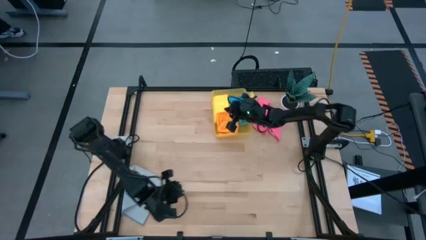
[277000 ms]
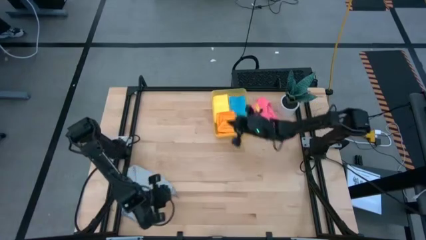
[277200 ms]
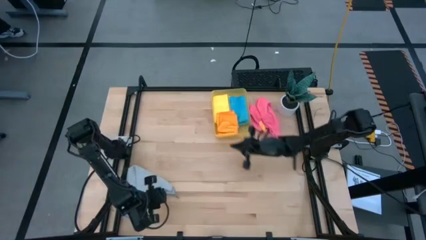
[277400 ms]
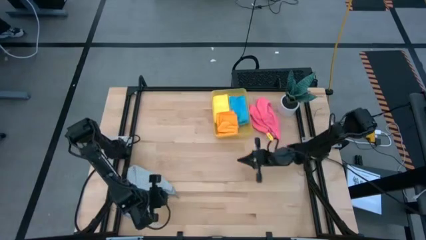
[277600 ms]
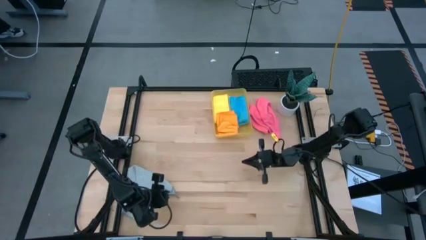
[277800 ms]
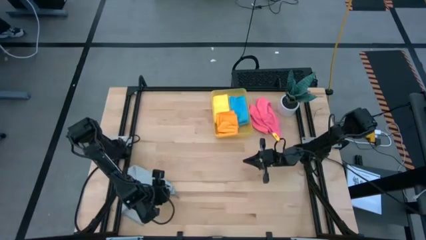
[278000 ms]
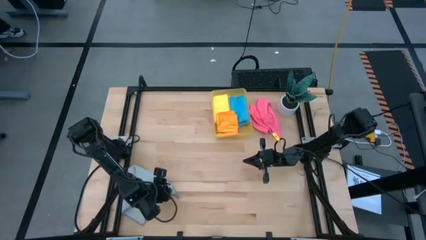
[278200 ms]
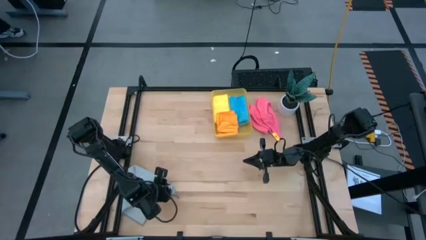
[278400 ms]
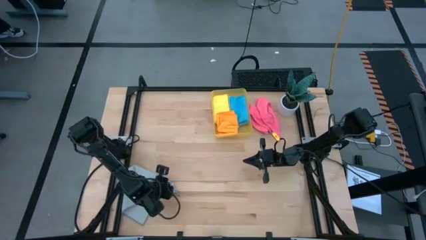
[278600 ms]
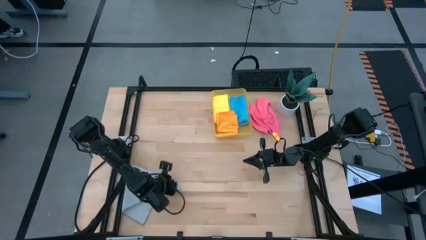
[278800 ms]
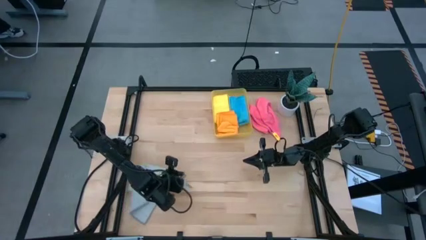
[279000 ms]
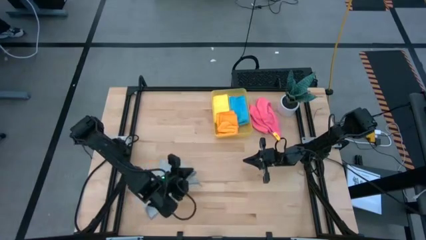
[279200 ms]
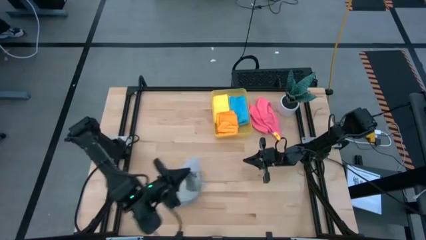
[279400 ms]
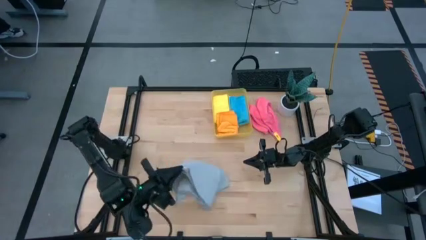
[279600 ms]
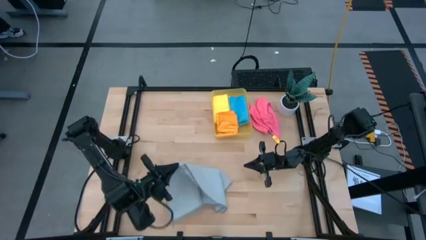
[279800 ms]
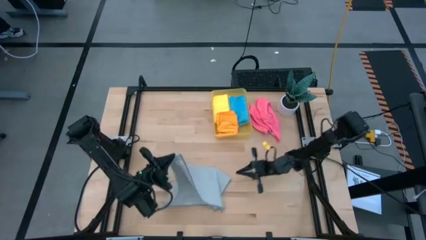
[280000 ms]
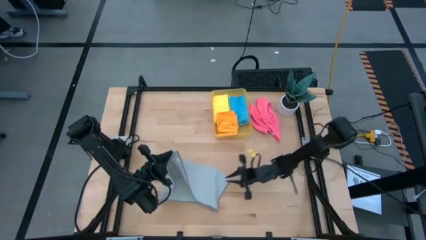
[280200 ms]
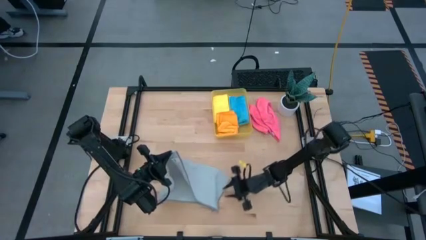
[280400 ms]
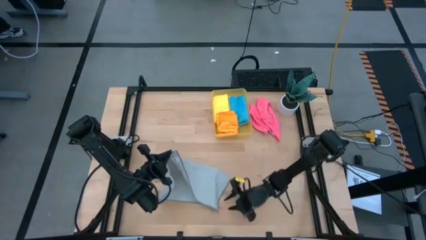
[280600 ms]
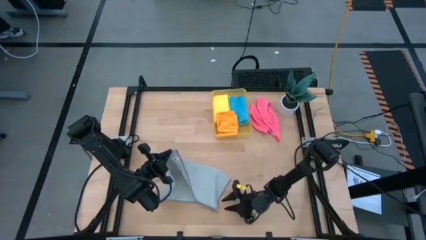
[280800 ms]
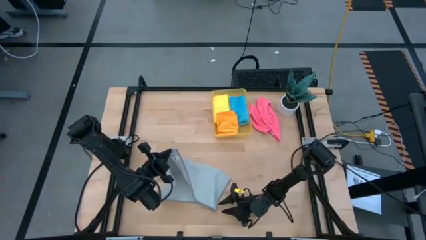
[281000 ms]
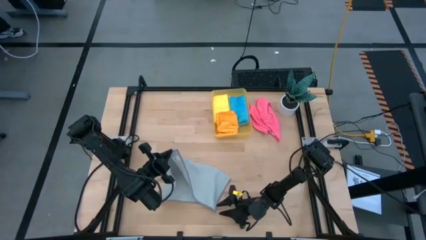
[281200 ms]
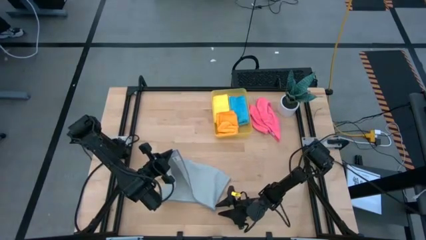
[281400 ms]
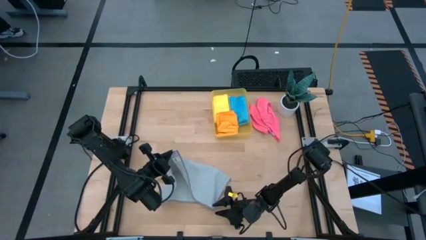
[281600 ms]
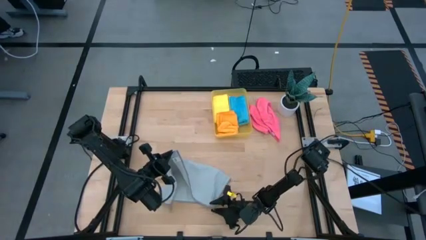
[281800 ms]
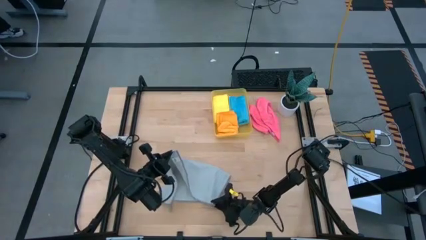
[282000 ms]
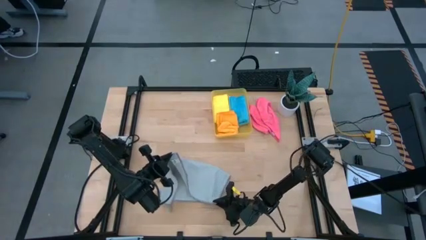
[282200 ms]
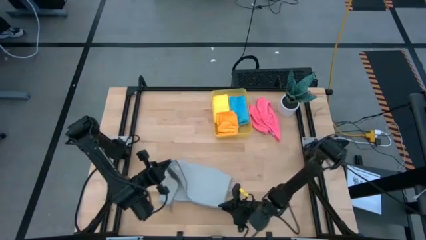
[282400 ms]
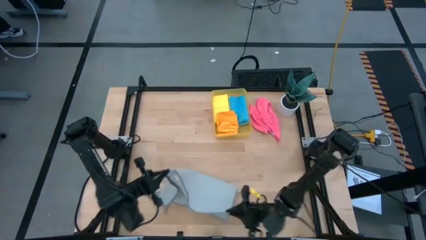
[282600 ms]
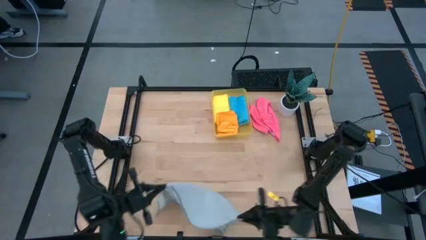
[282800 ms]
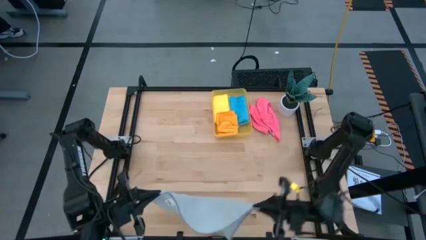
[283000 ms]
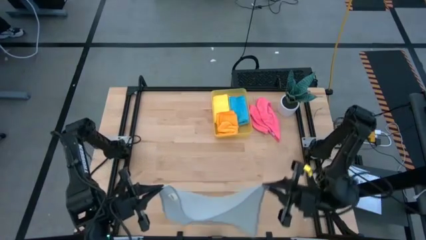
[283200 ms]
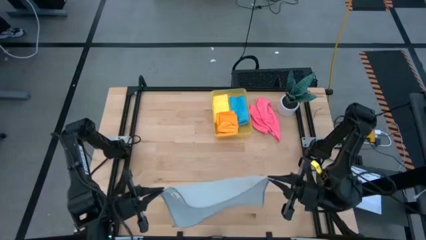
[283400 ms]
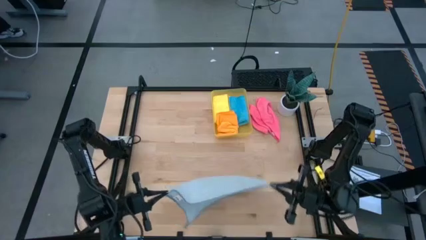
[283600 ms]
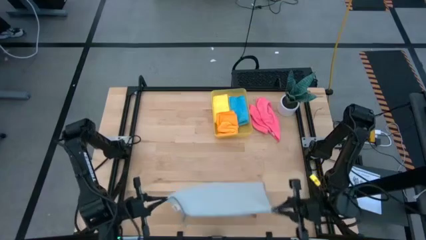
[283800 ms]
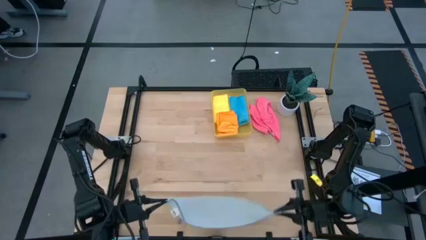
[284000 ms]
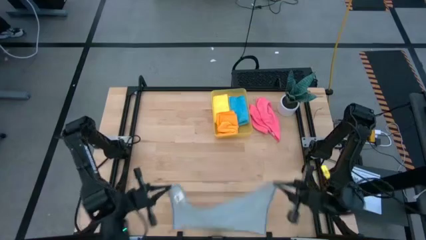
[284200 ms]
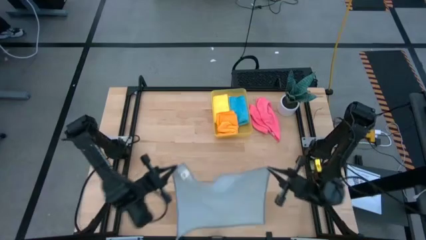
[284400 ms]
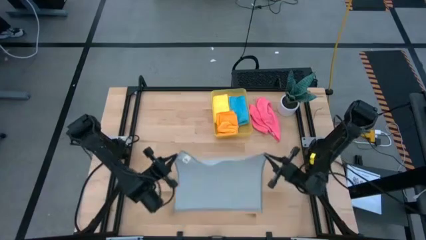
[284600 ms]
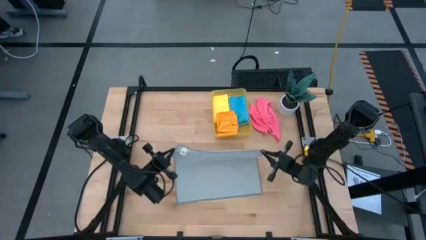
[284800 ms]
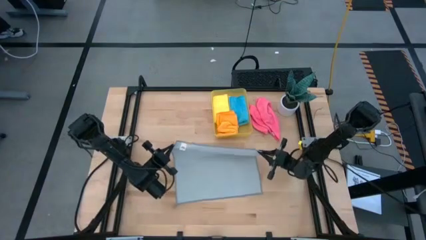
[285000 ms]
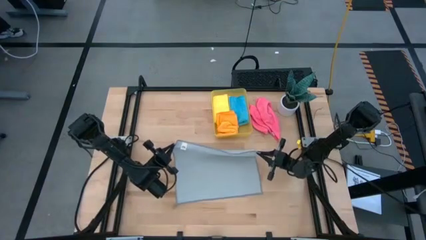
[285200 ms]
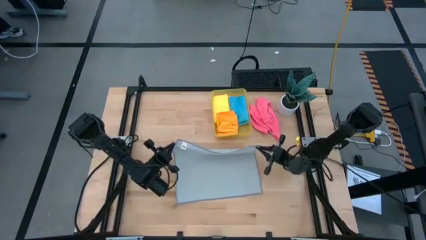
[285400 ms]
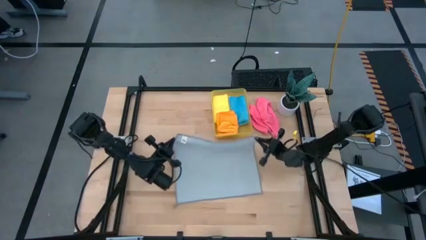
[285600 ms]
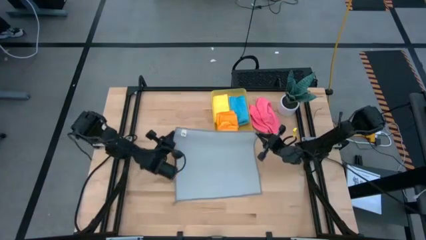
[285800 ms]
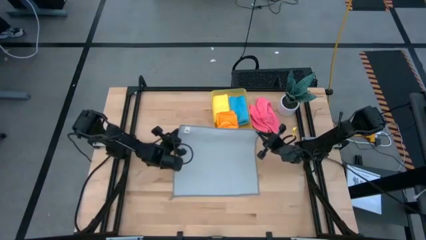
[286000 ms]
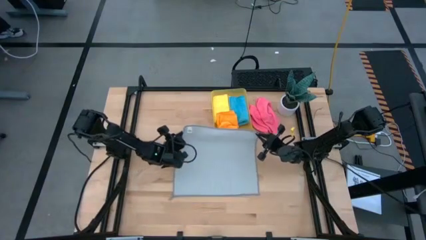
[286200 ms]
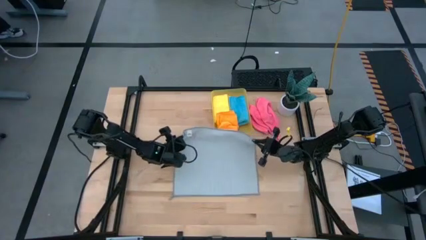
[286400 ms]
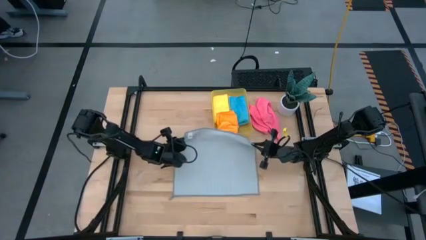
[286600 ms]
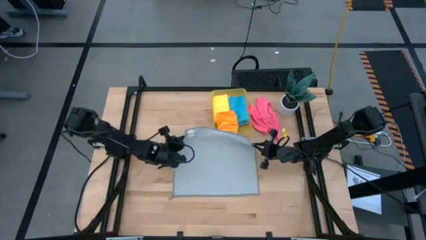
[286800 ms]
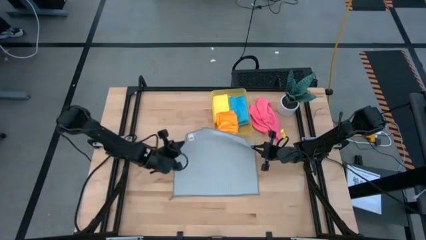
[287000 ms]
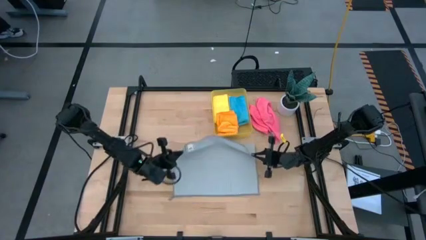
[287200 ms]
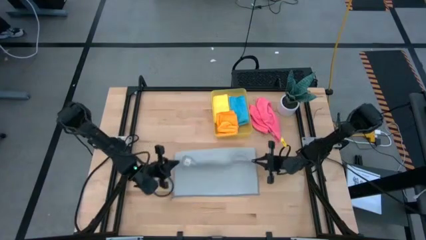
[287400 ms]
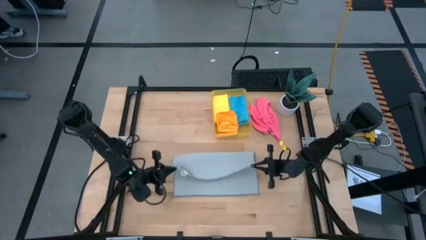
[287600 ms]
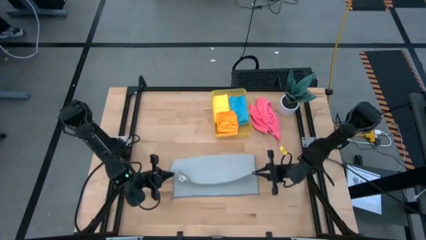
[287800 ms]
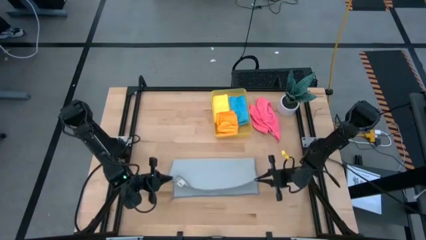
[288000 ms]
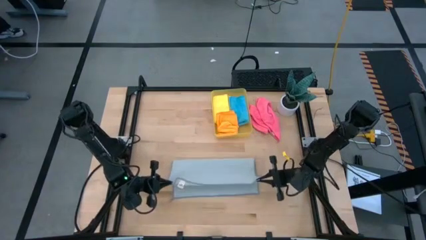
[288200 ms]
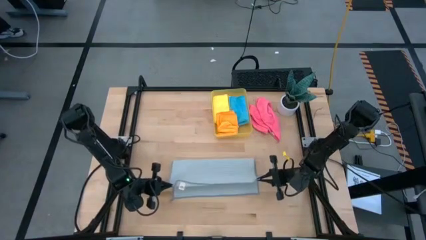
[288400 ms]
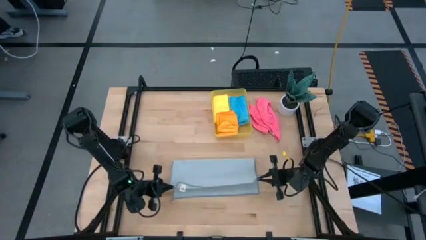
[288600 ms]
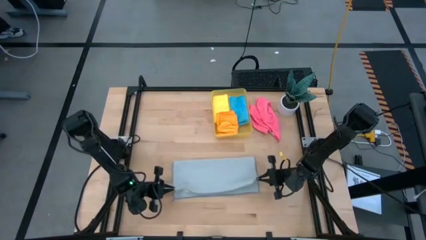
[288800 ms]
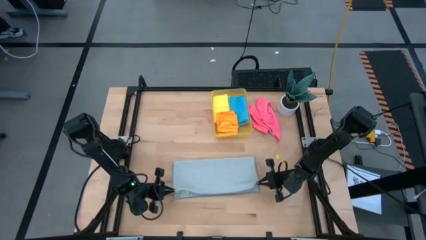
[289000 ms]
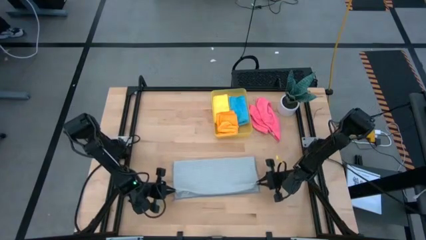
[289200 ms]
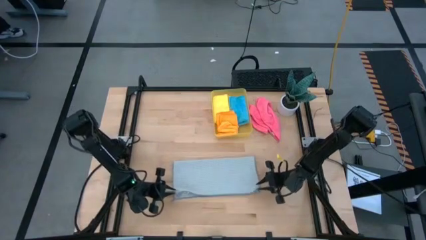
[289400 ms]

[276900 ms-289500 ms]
Task: Fold microfiber towels
Fold the gray microfiber towel

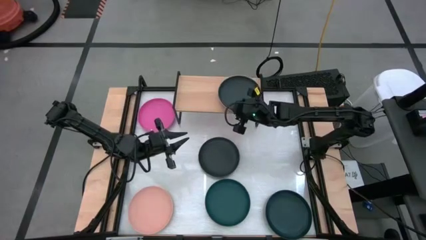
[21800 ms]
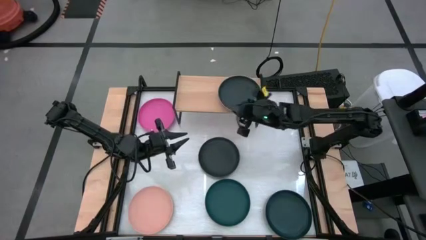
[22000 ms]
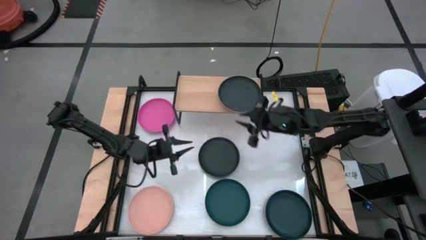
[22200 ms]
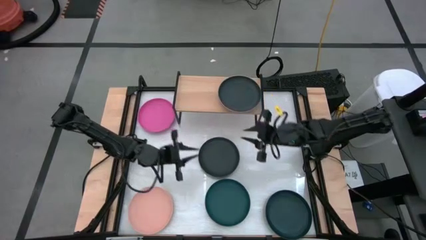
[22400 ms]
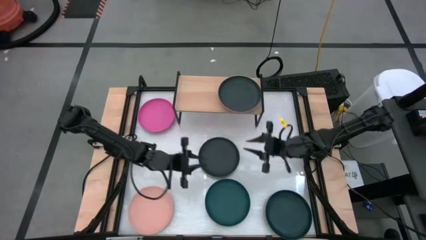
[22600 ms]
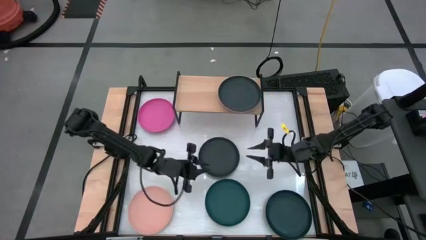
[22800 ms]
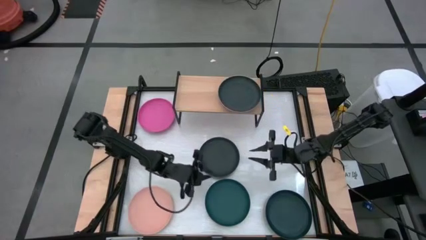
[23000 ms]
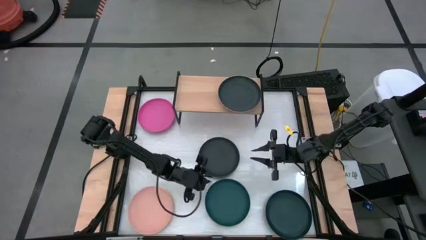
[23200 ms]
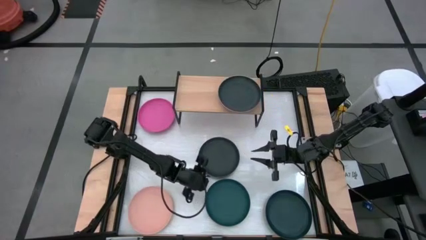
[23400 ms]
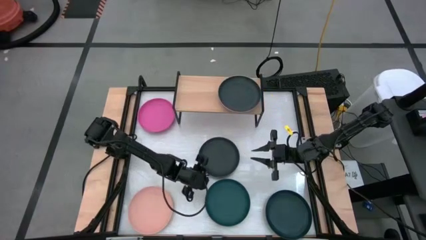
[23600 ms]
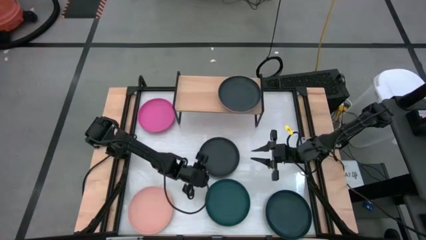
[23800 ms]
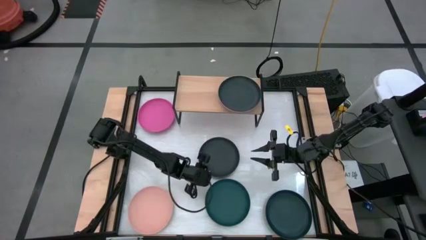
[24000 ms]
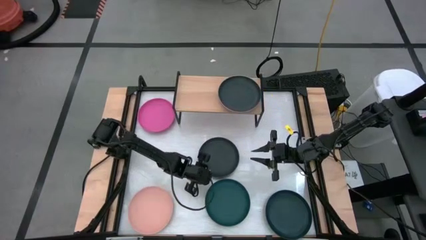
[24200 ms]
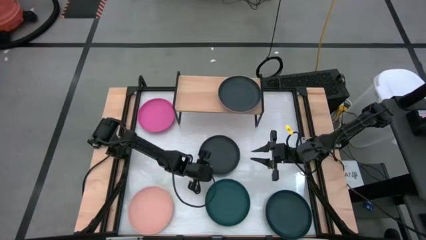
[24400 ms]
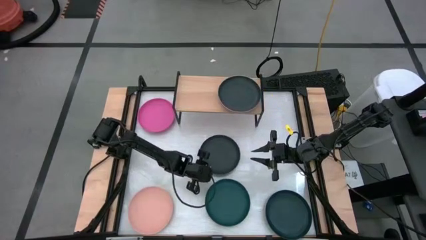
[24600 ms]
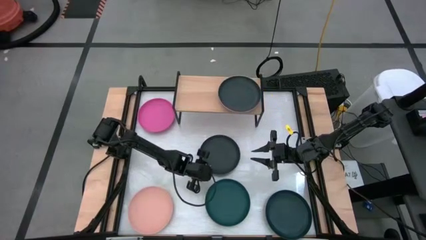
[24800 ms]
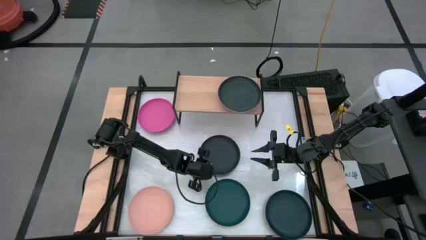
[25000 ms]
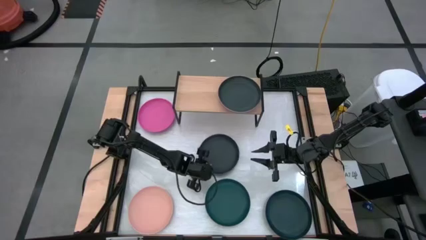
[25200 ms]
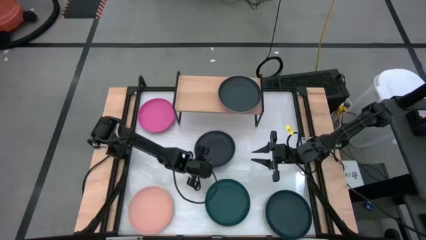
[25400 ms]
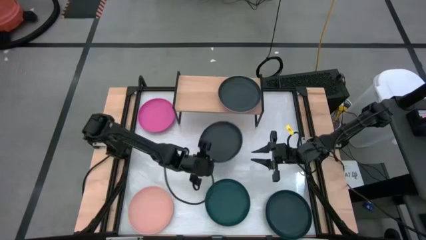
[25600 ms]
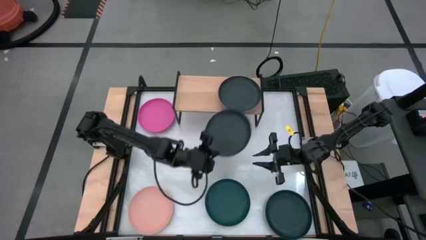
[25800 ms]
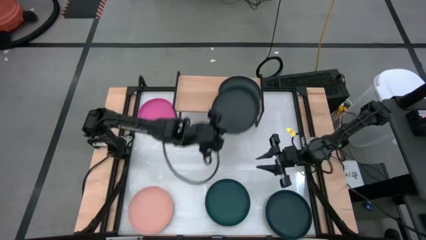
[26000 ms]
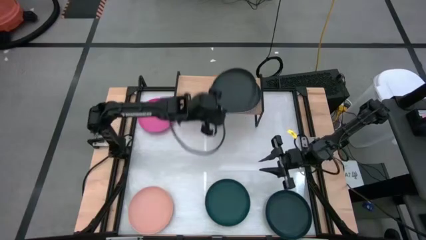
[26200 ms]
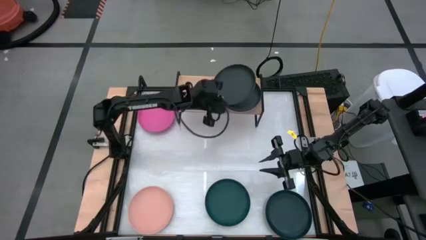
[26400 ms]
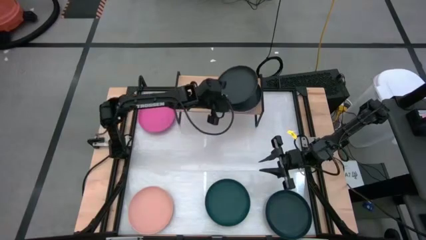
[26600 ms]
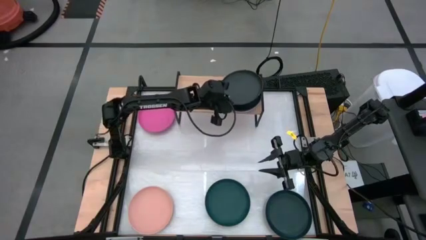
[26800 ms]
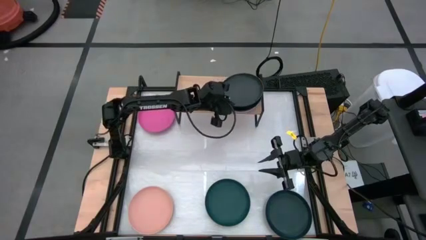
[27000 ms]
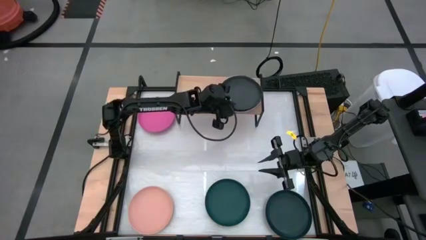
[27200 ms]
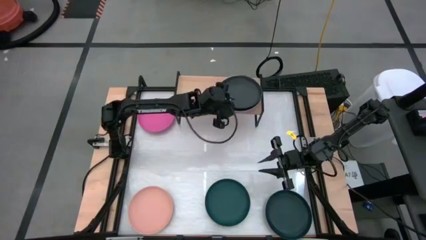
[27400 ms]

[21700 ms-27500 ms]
Task: Place and stack plates onto a shelf
Stack the black plate on top of the black plate on the shelf
